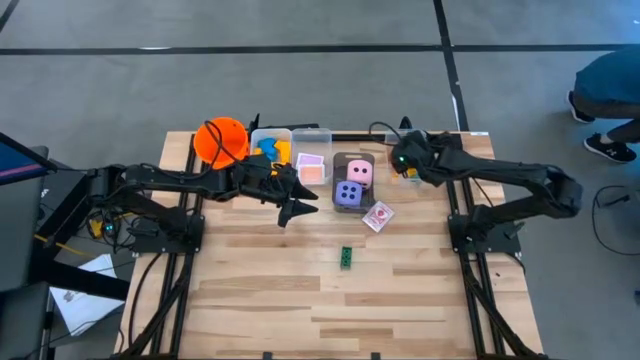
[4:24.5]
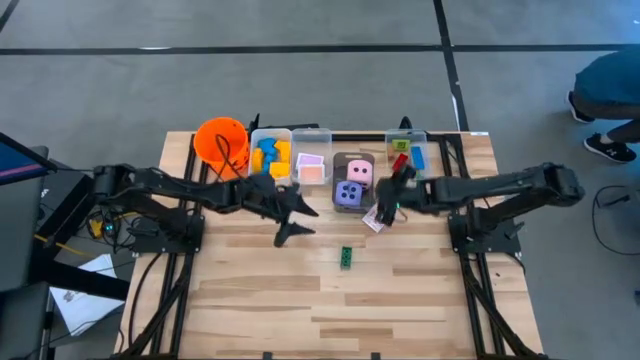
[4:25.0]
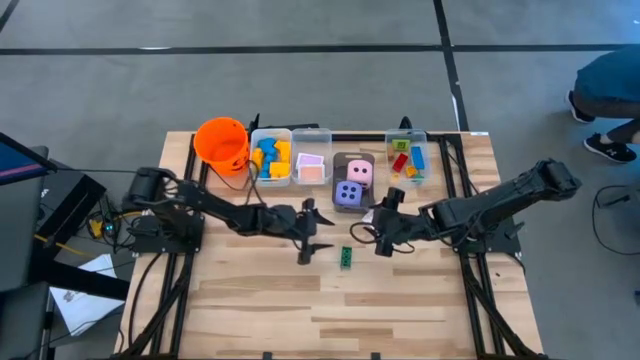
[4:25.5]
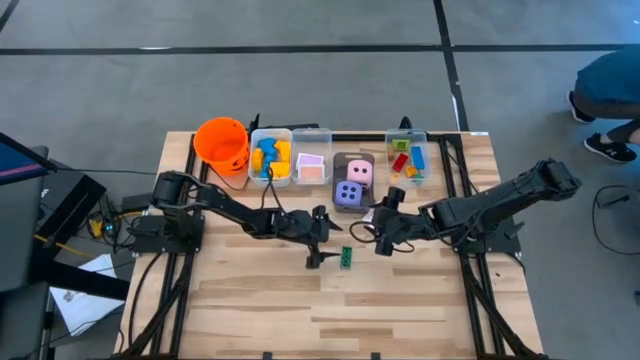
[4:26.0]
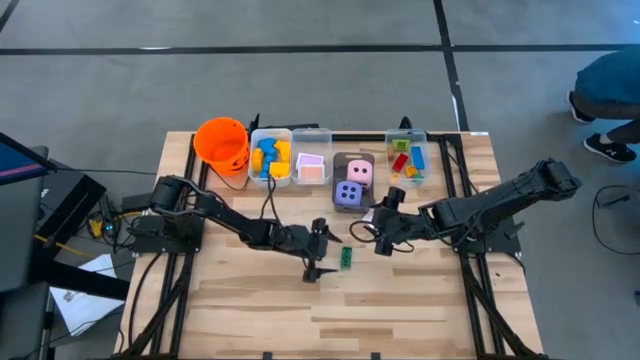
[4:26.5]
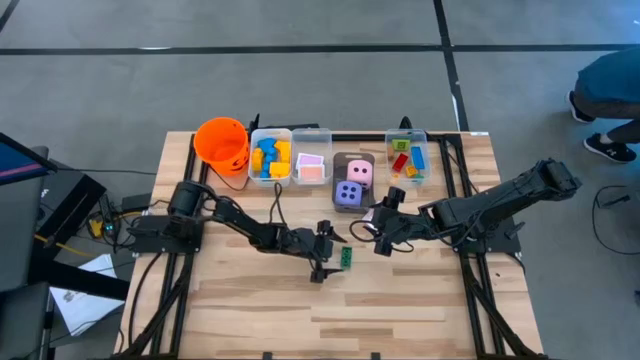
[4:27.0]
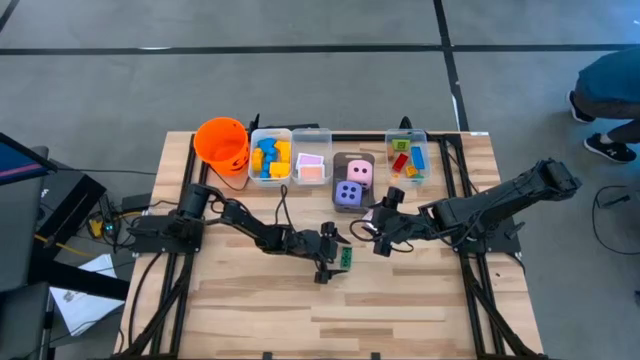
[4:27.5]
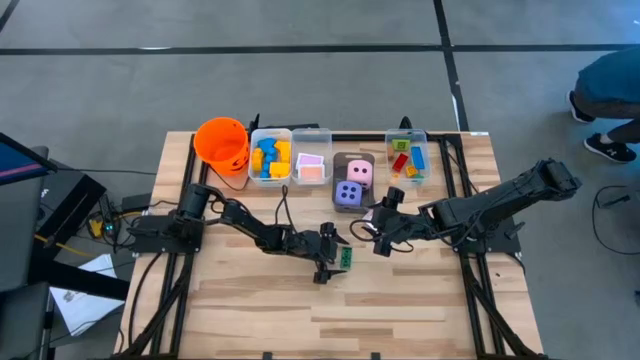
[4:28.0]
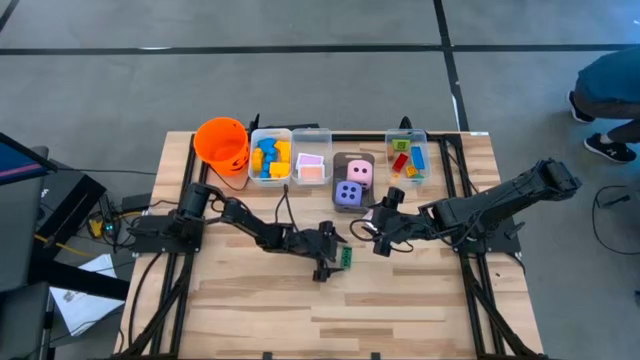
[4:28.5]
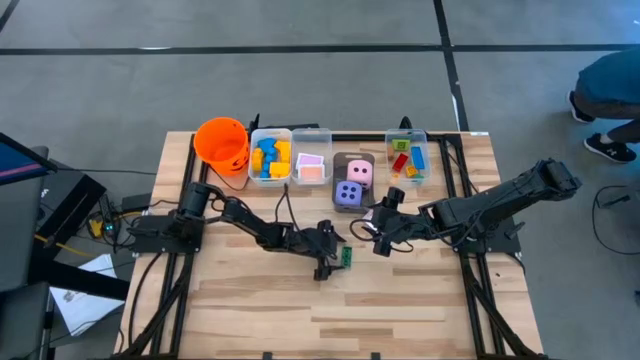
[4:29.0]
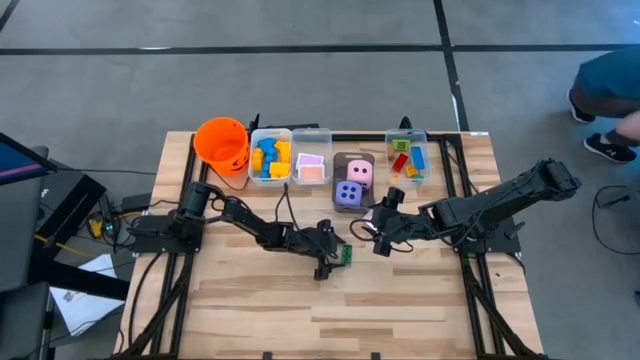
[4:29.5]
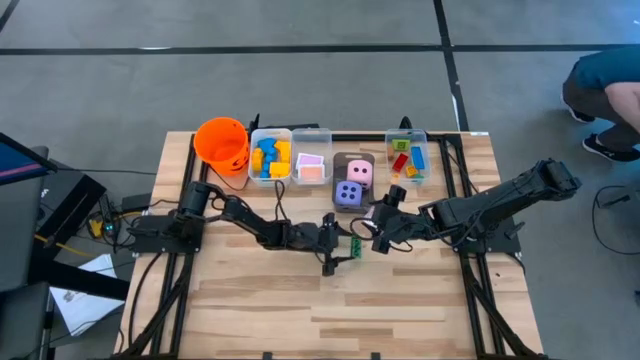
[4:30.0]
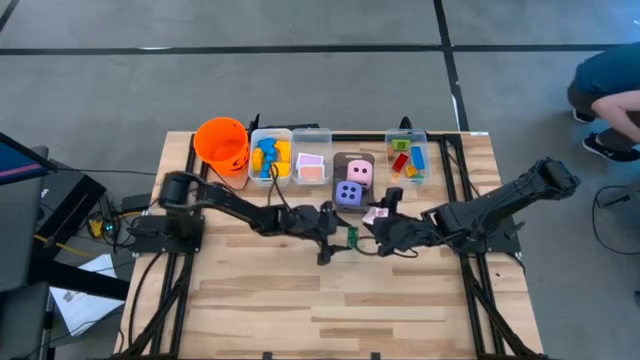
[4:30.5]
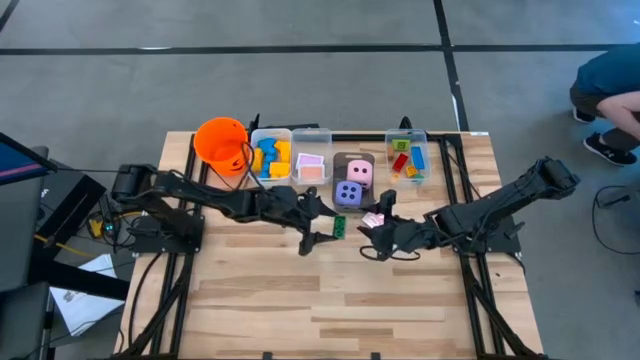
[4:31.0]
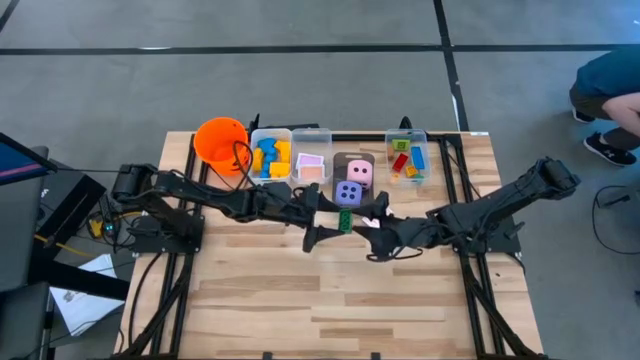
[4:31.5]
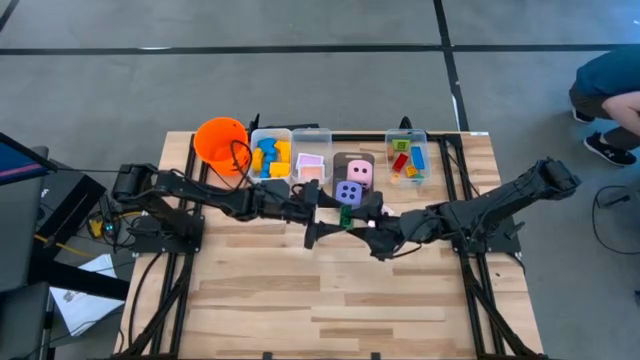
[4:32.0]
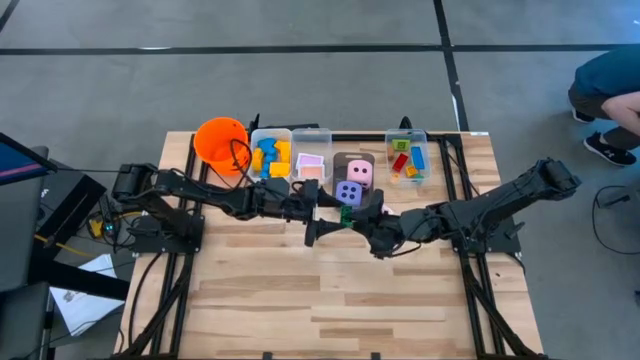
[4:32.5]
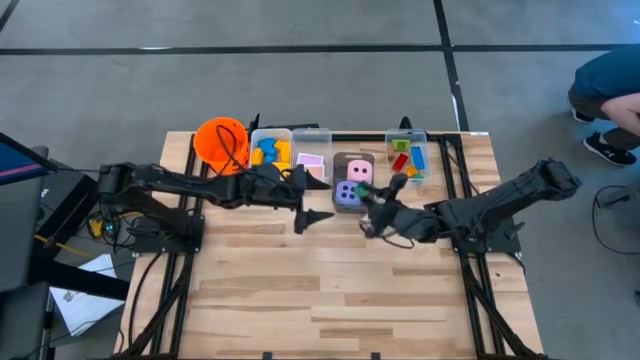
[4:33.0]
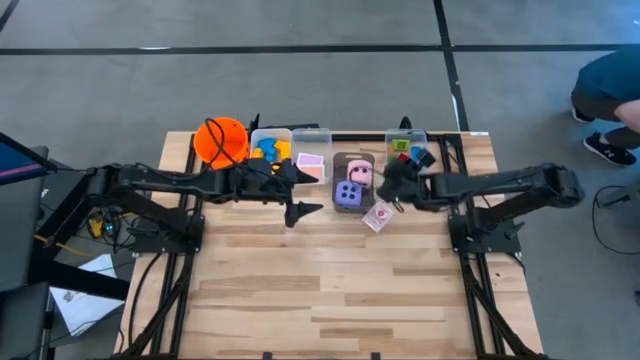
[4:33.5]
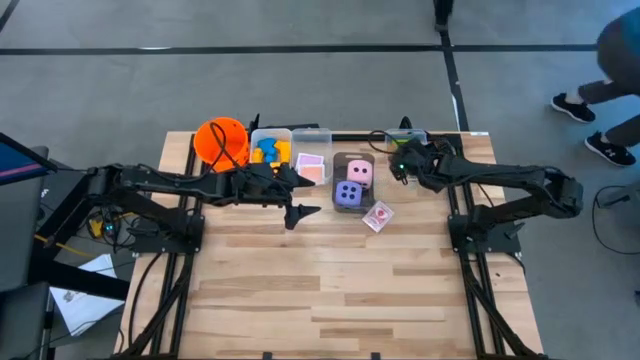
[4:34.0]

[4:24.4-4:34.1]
Task: Pick & Place Toys
Put the green game piece into the right transparent bin

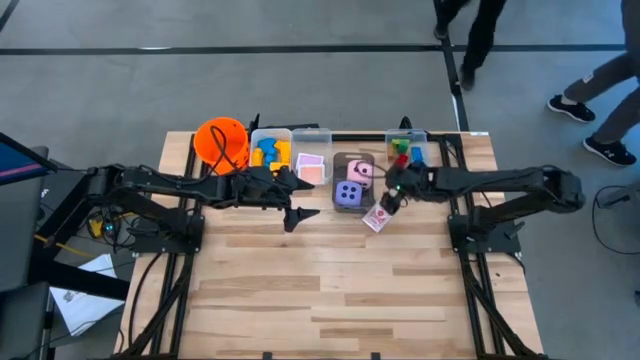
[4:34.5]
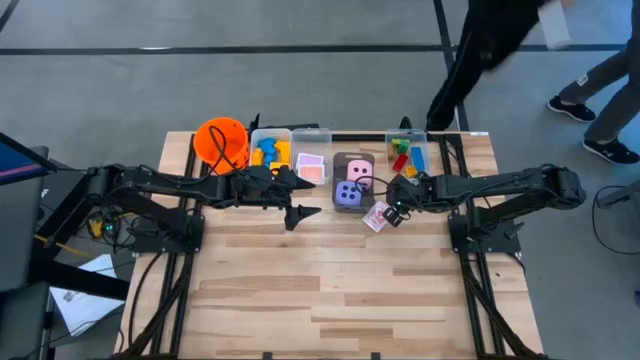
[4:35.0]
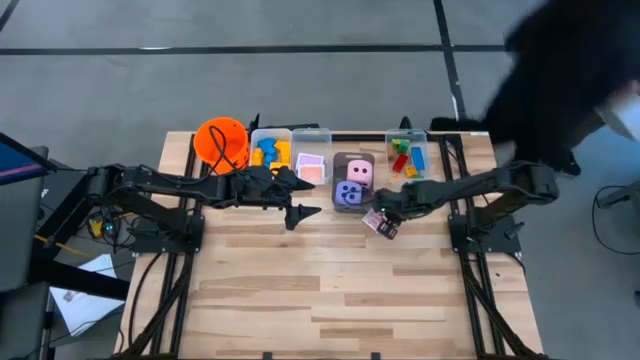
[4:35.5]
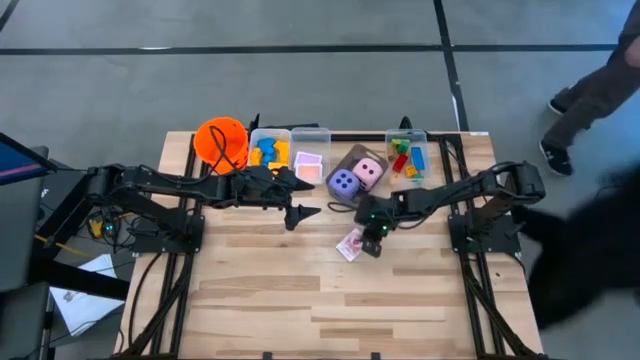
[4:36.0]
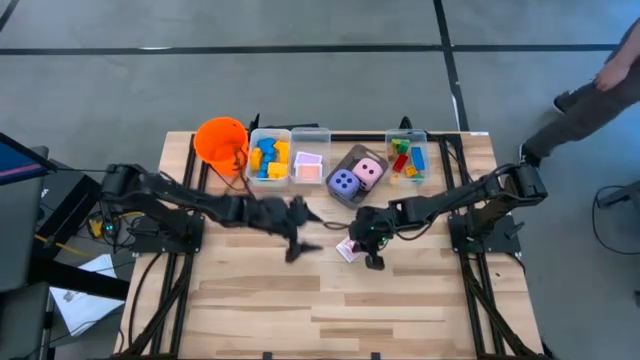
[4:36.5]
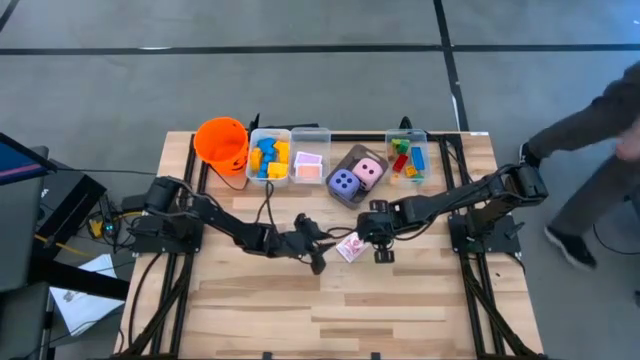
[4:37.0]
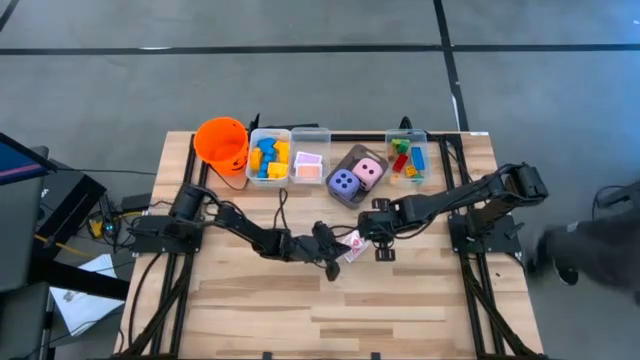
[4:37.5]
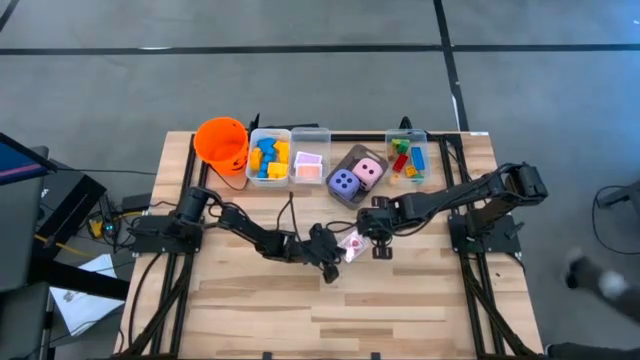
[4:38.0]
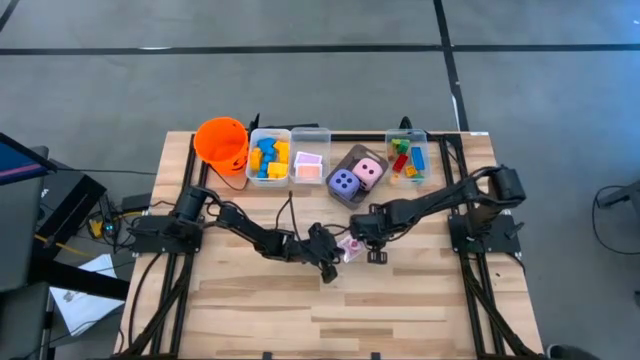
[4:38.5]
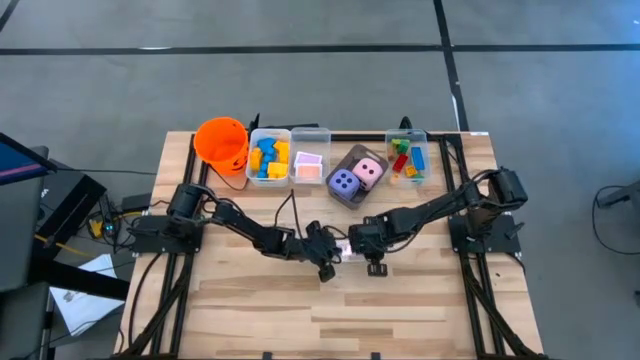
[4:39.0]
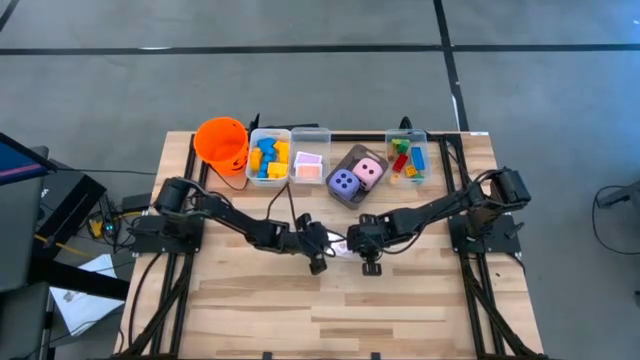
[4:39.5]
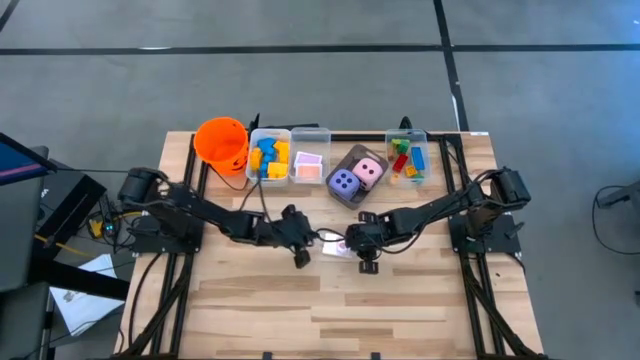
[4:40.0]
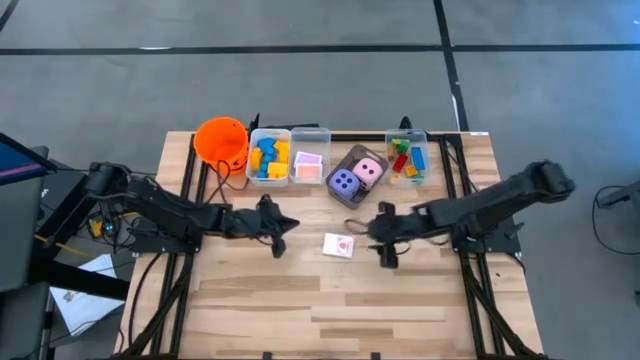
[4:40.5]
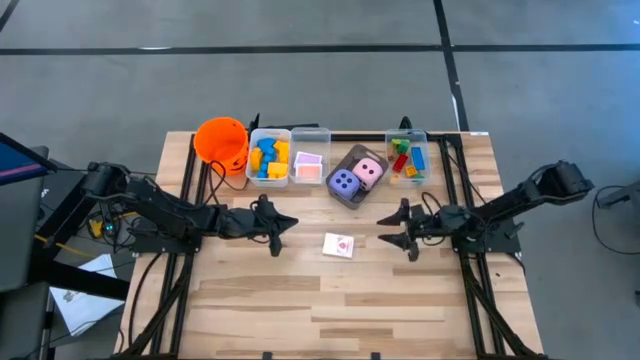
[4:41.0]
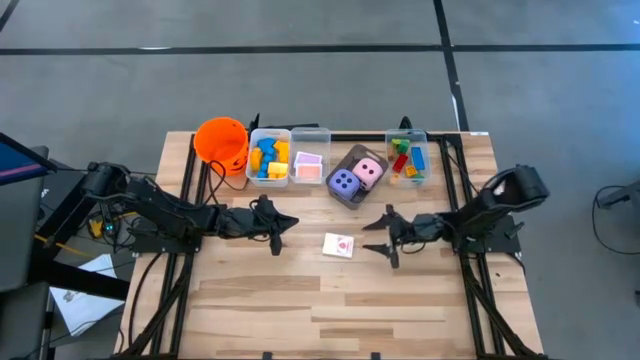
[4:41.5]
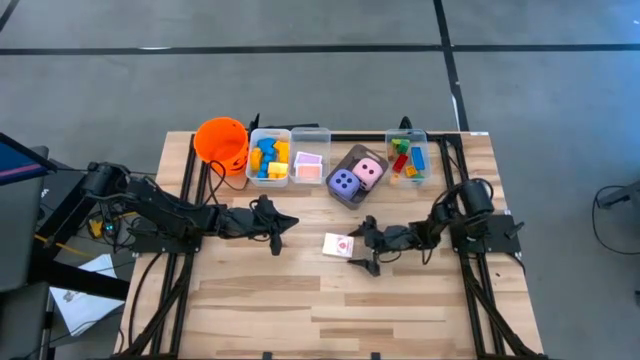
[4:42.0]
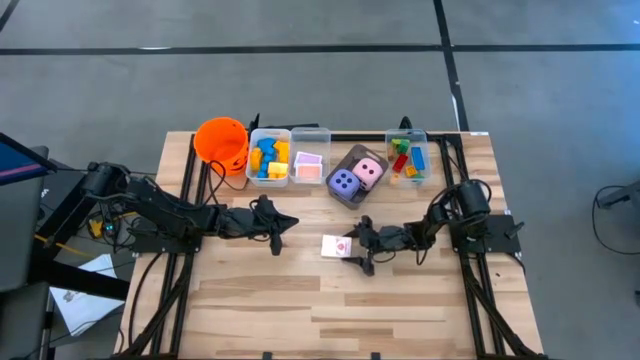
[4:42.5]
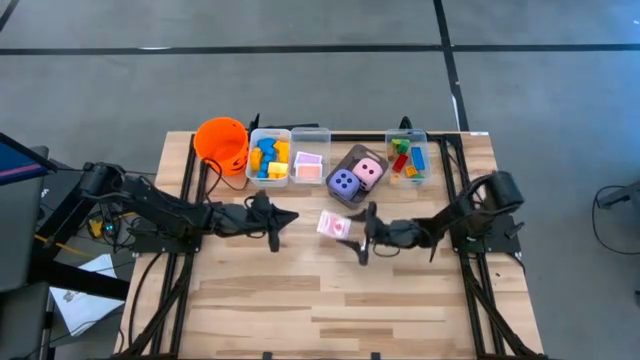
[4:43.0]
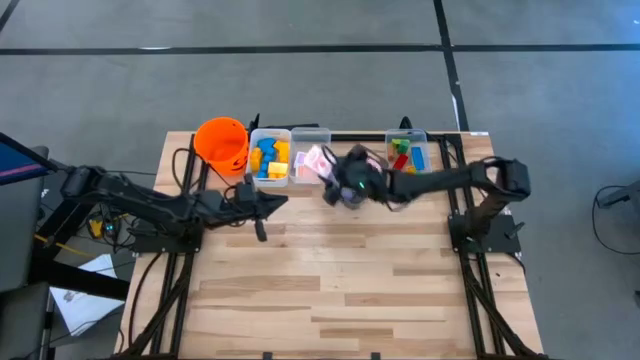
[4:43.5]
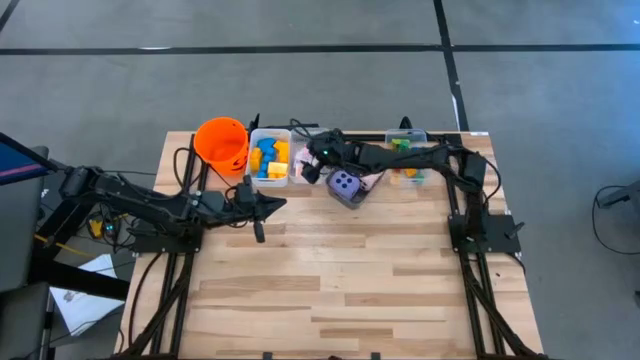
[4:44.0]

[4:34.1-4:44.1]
Put the red deck of cards into the left transparent bin

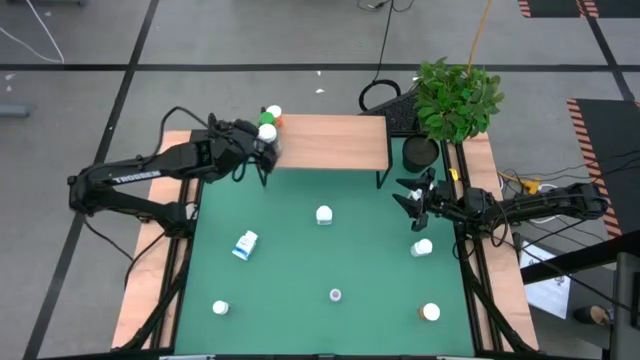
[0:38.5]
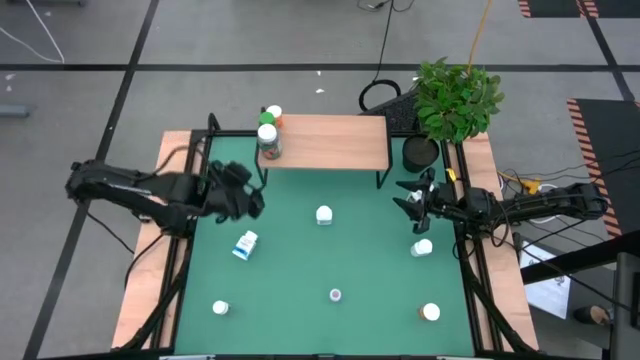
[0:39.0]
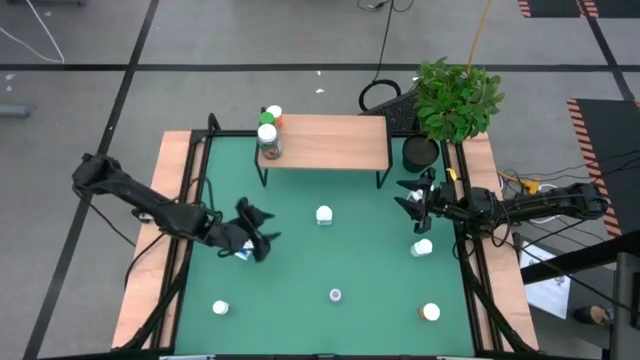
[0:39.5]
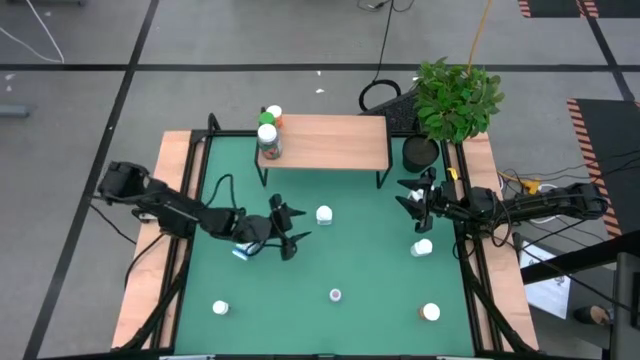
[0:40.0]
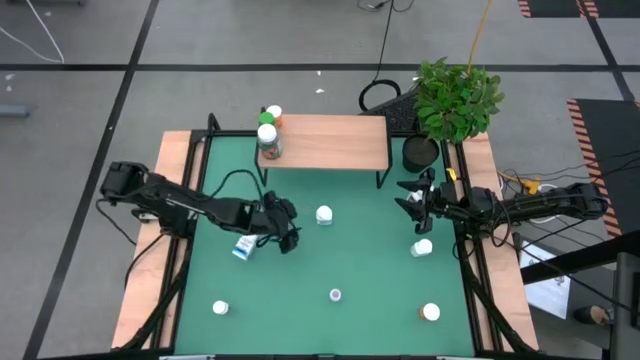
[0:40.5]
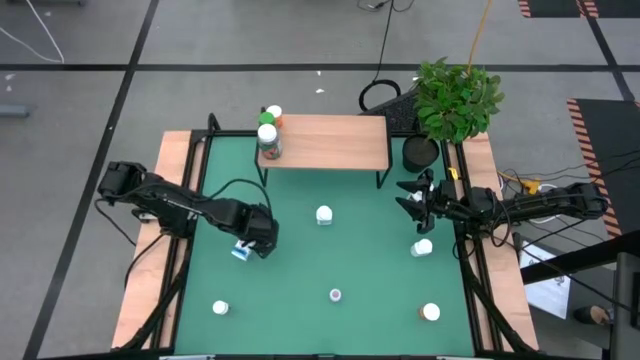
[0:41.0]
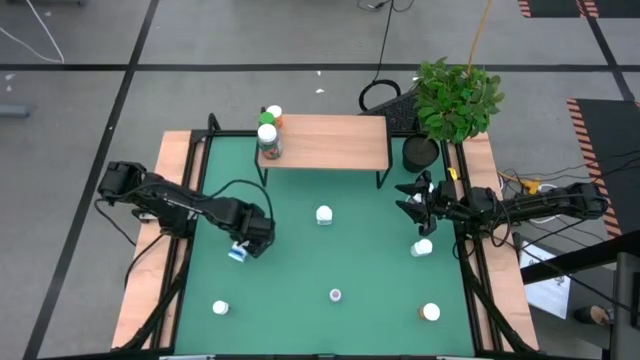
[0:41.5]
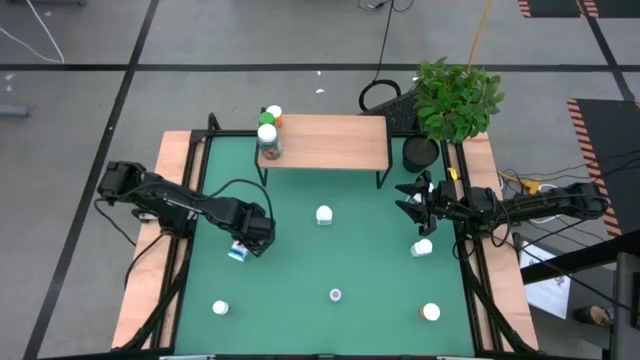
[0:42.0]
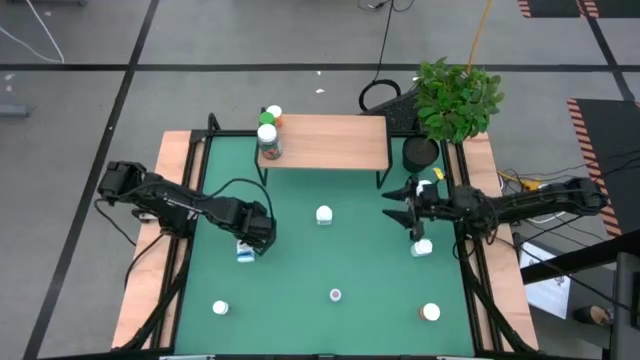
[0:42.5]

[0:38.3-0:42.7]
Task: Pick and place medicine bottles onto shelf by color
Put the bottom left blue bottle on the shelf
